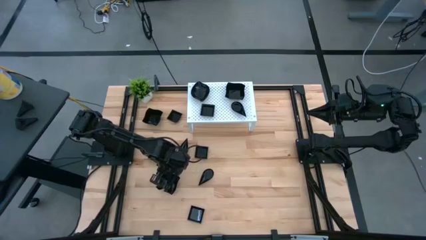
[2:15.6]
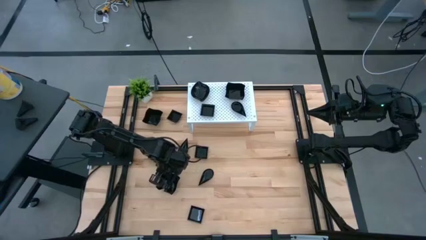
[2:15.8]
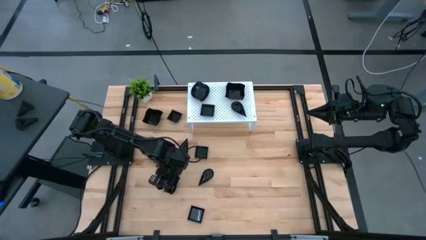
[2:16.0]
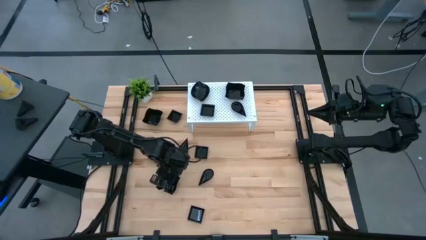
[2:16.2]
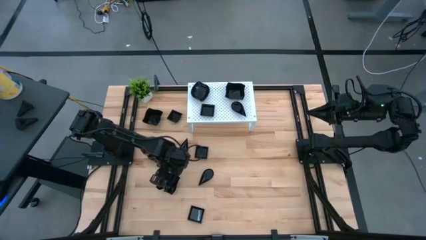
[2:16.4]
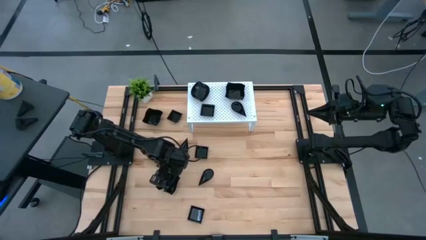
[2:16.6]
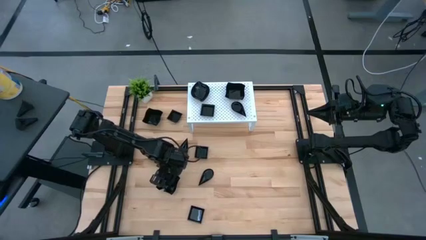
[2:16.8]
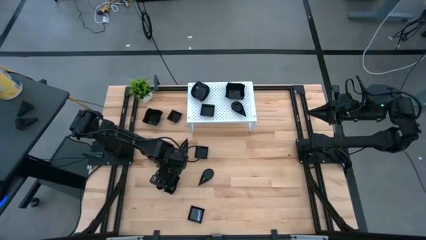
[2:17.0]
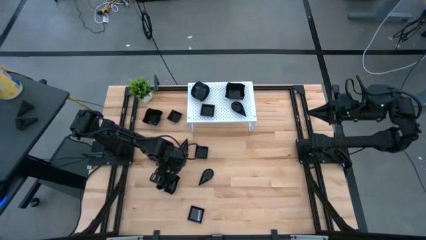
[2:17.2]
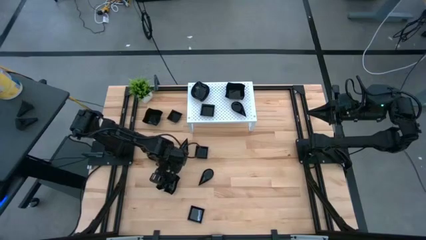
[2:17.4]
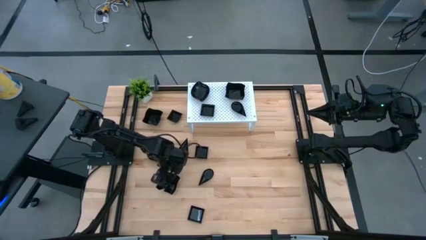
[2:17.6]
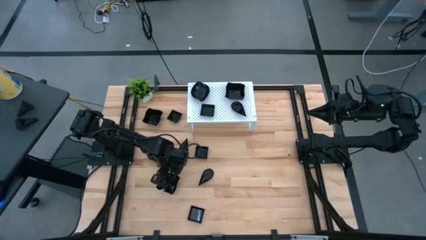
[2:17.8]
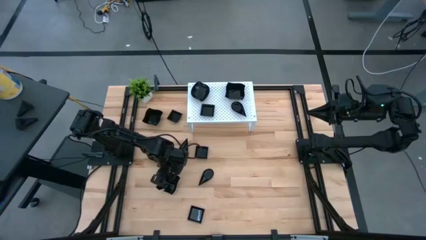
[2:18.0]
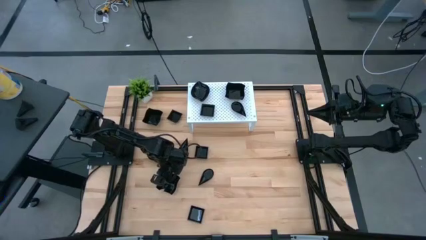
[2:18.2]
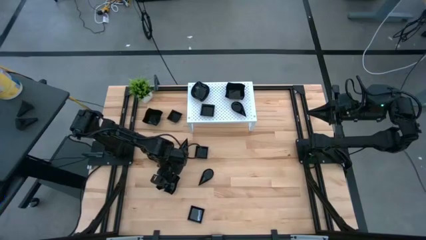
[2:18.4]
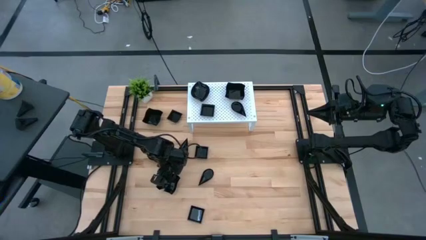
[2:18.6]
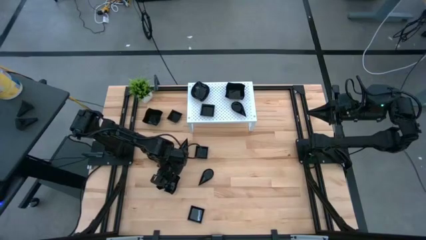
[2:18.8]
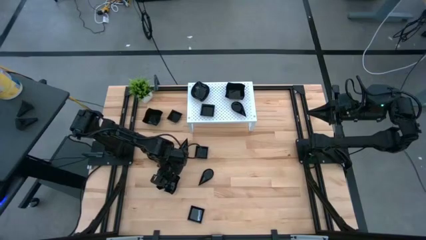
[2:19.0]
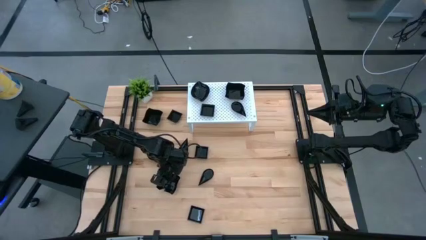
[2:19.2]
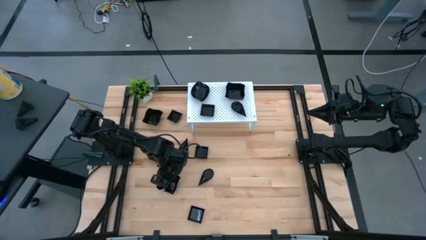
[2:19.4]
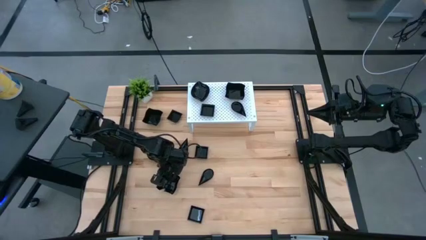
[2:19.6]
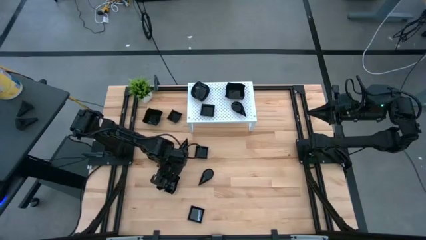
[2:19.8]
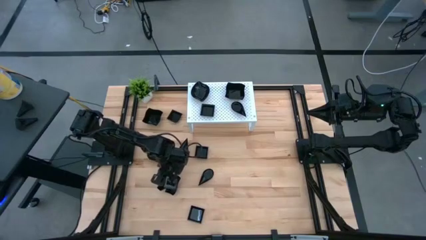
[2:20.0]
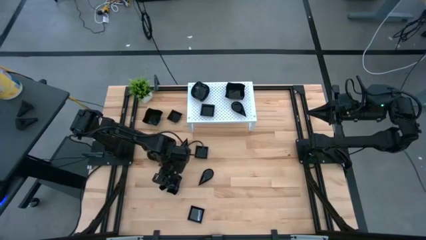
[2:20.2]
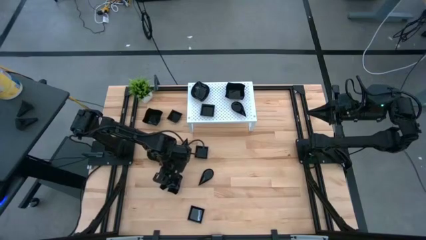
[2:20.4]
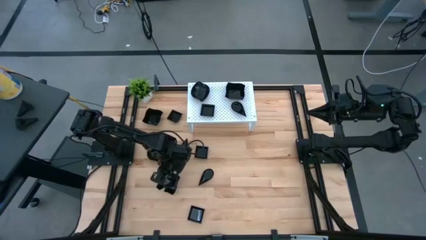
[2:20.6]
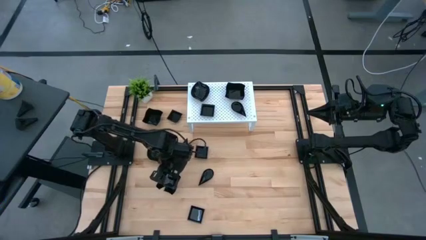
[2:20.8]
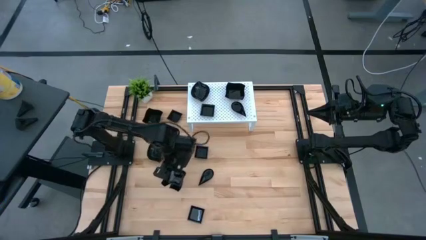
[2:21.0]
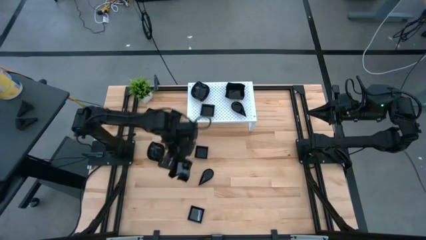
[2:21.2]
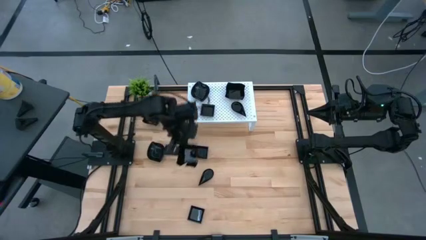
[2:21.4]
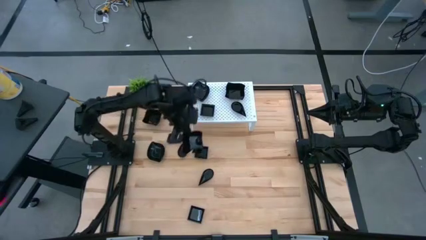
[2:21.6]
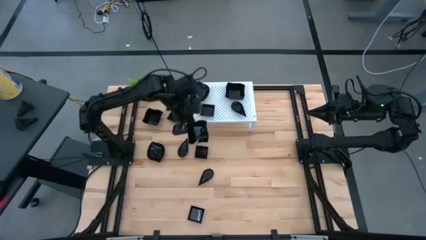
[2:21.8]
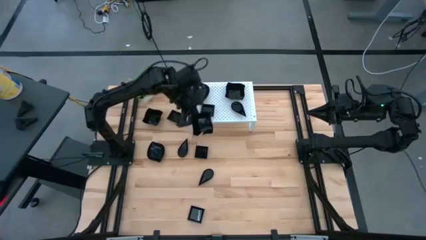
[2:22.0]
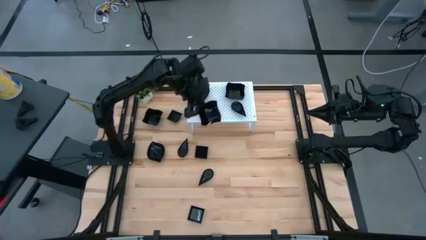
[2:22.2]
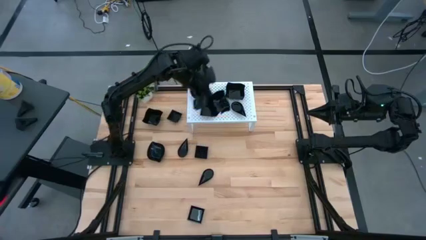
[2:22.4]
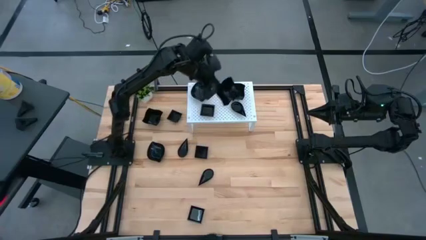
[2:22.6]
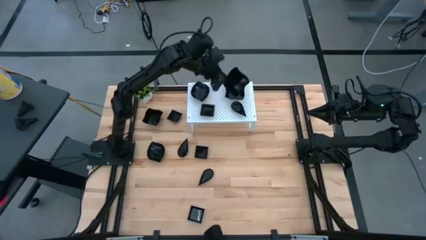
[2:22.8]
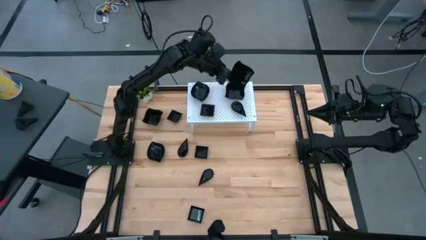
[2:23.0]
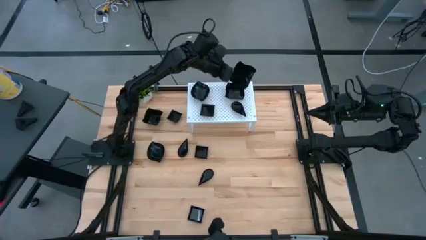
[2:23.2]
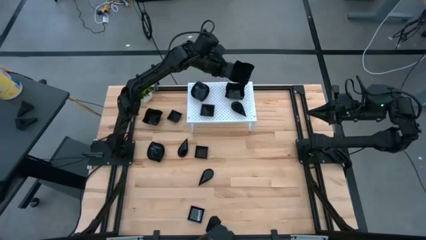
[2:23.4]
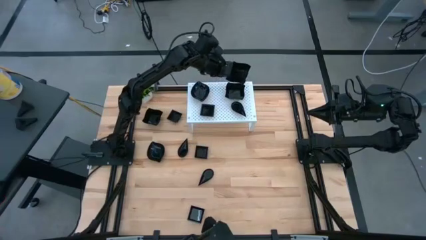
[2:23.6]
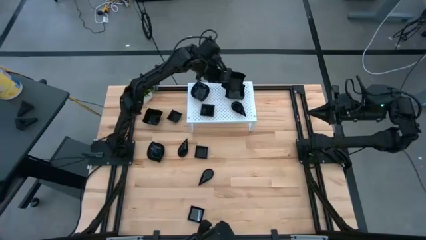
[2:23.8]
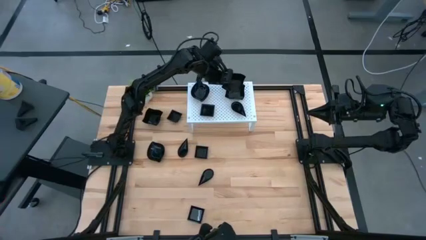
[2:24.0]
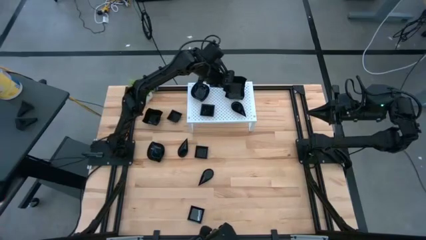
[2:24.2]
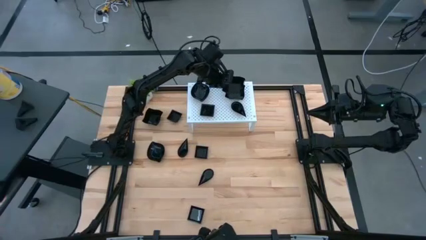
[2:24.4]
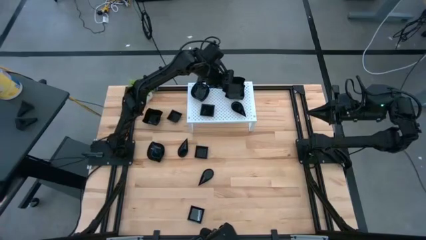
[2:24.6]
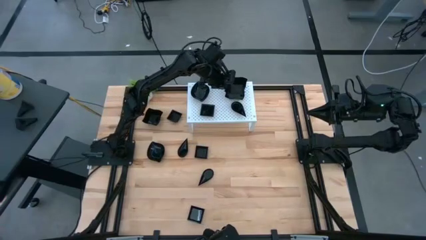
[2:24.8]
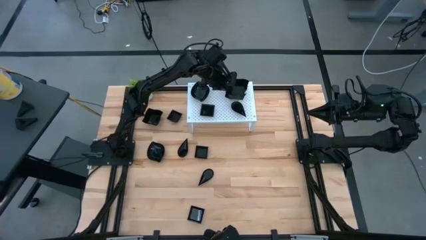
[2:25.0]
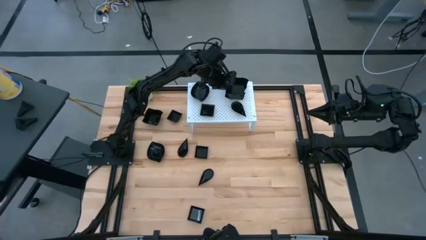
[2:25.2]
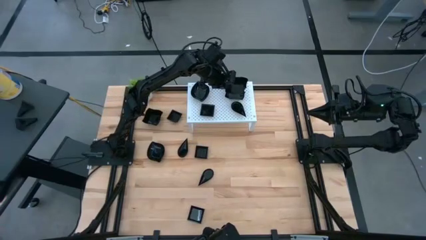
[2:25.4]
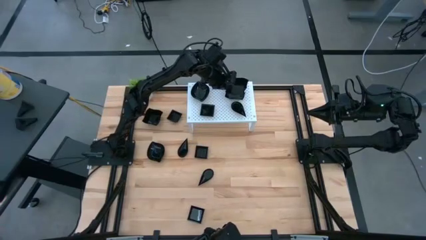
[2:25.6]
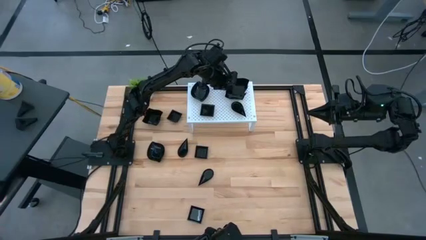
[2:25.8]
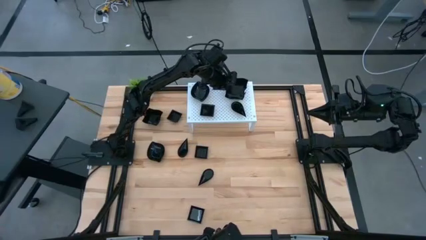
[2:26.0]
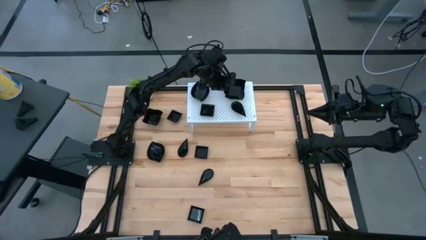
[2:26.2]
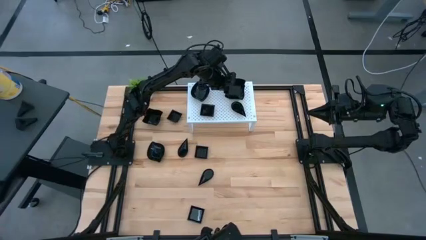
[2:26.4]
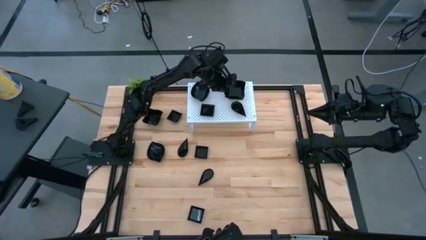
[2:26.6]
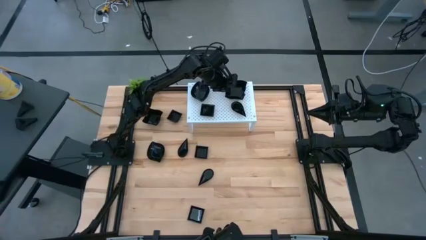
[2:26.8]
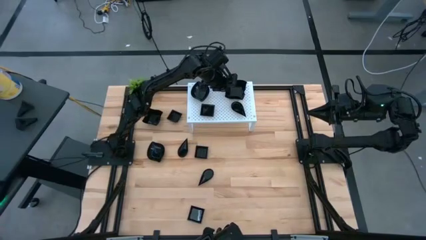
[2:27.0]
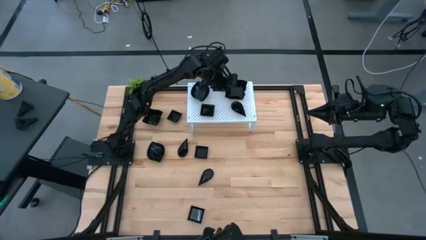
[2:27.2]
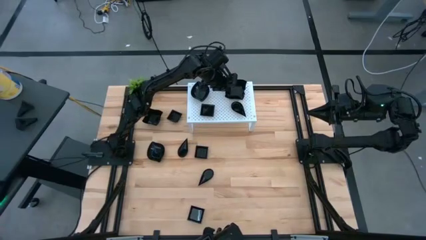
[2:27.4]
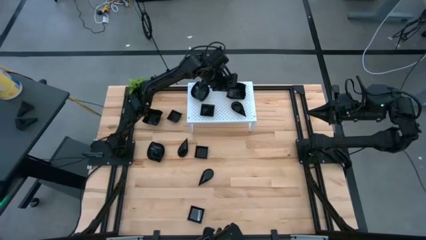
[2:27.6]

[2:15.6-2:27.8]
Task: Pick & Place Mini shaped plates
Stack the distorted square plate on top of the distorted square plate on the shelf
